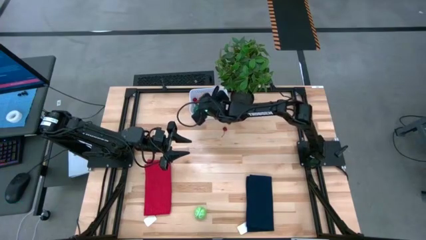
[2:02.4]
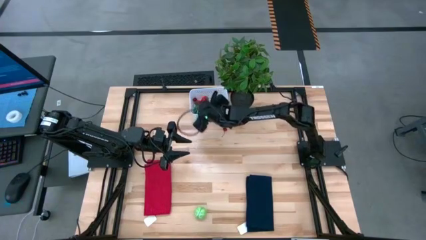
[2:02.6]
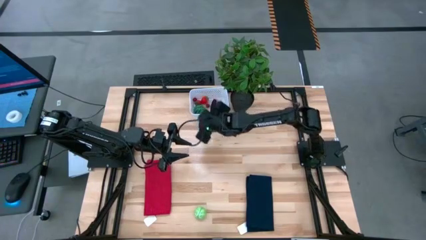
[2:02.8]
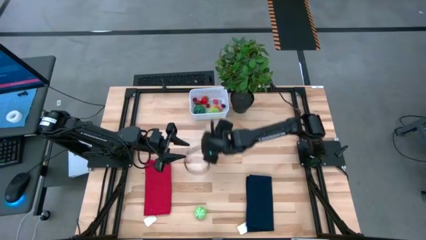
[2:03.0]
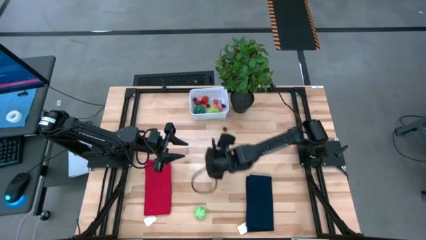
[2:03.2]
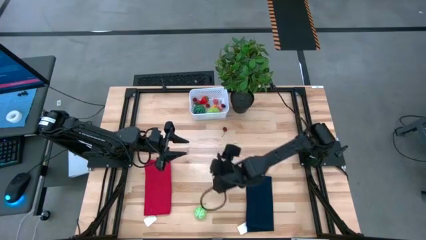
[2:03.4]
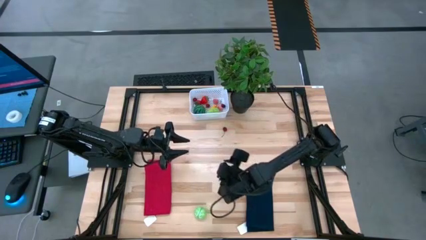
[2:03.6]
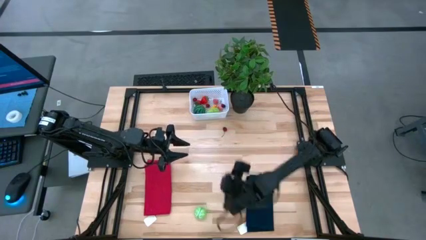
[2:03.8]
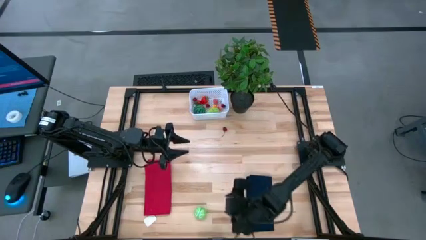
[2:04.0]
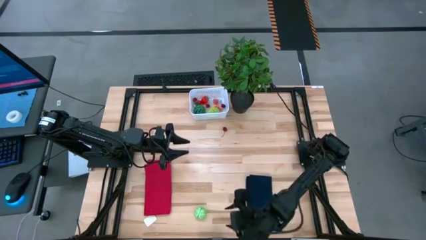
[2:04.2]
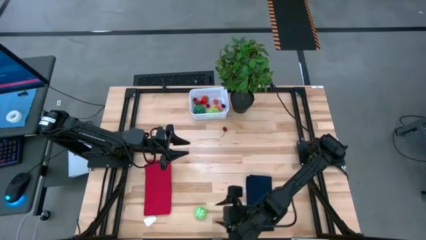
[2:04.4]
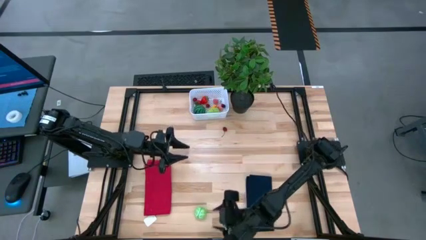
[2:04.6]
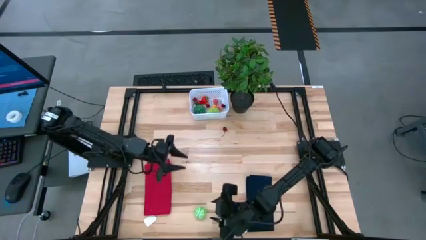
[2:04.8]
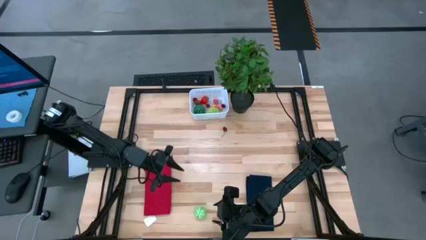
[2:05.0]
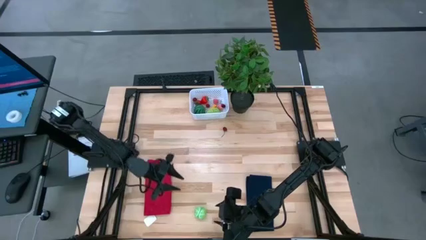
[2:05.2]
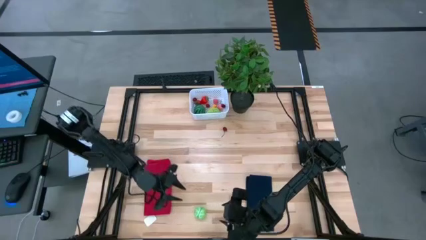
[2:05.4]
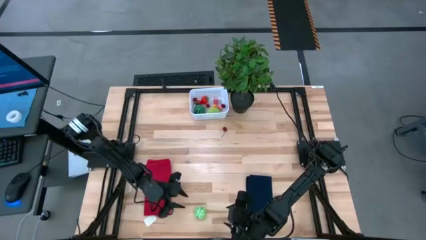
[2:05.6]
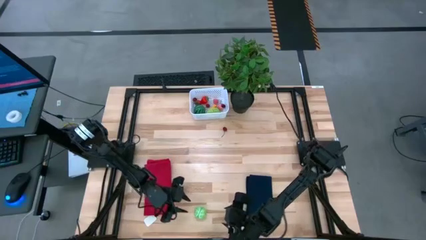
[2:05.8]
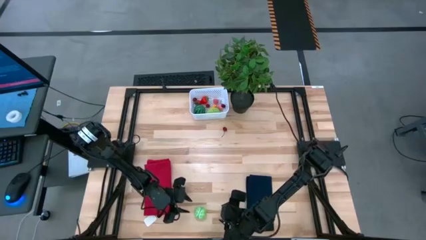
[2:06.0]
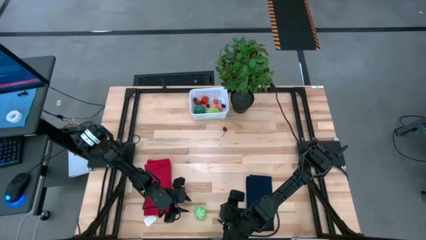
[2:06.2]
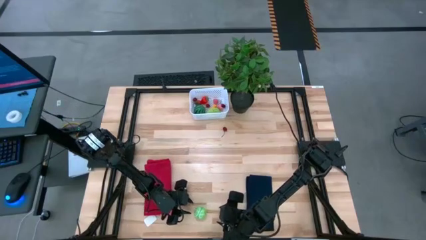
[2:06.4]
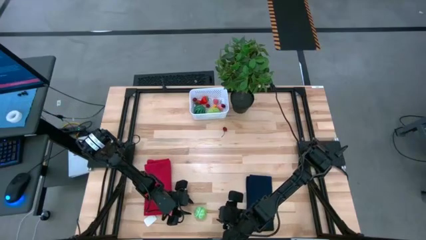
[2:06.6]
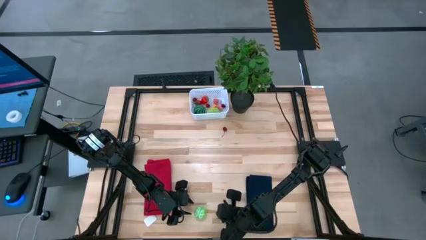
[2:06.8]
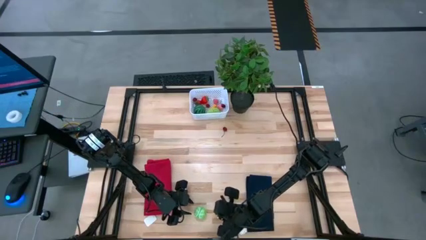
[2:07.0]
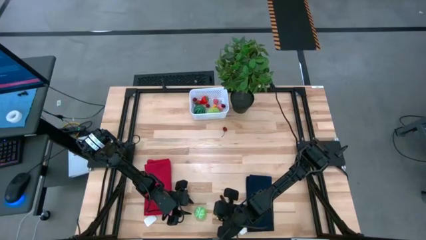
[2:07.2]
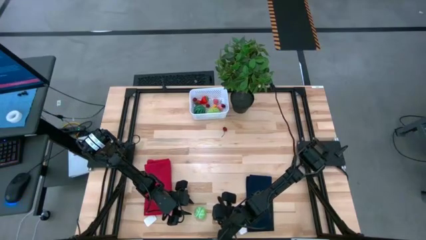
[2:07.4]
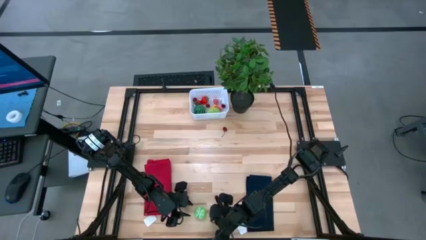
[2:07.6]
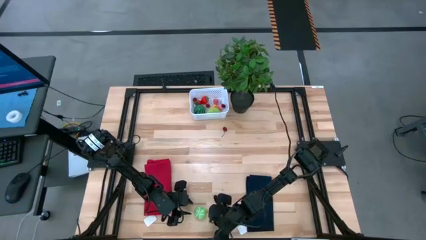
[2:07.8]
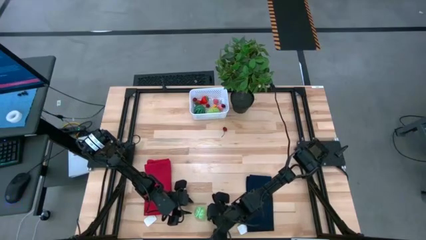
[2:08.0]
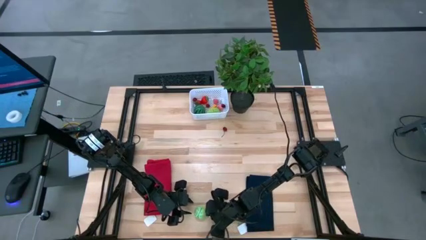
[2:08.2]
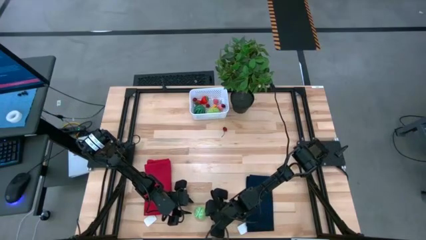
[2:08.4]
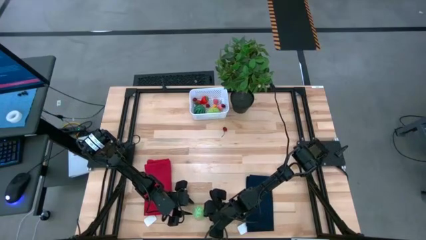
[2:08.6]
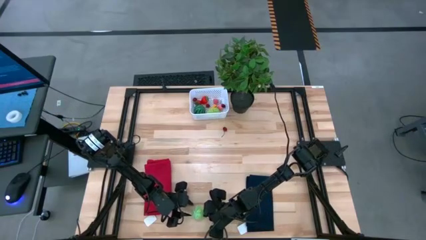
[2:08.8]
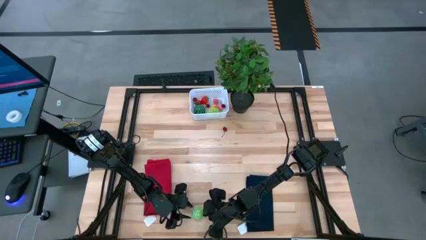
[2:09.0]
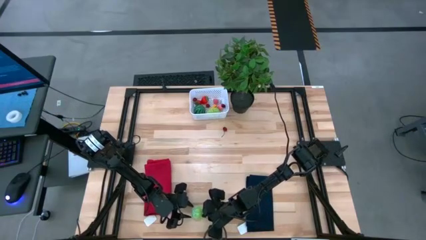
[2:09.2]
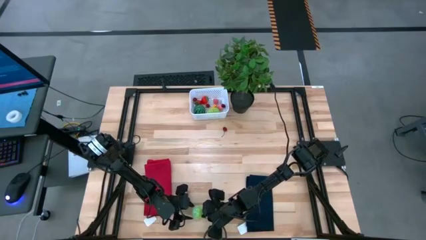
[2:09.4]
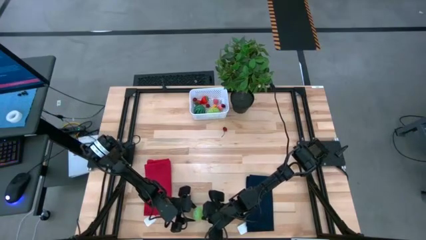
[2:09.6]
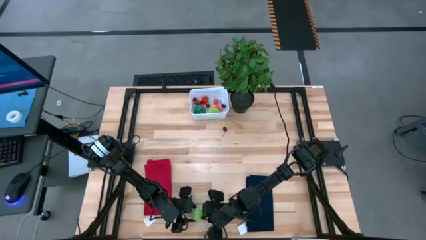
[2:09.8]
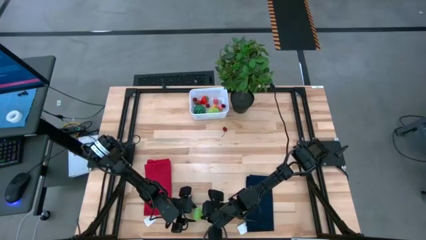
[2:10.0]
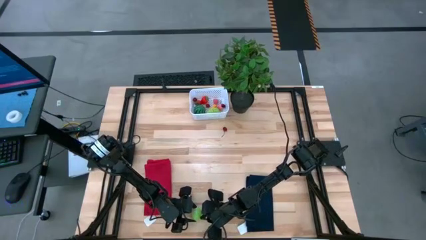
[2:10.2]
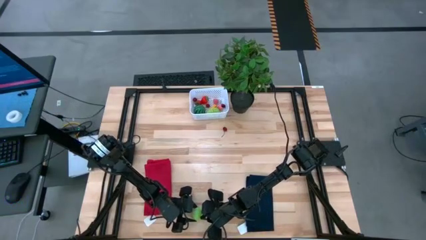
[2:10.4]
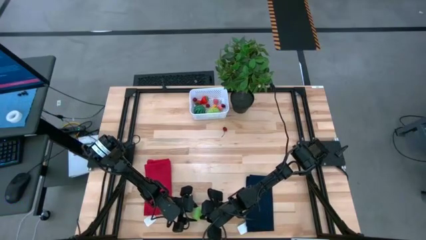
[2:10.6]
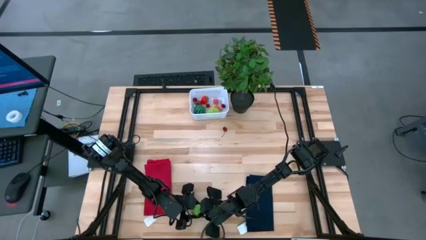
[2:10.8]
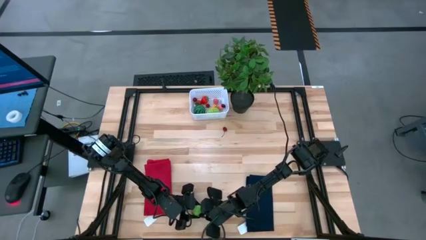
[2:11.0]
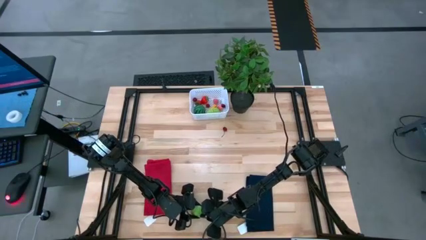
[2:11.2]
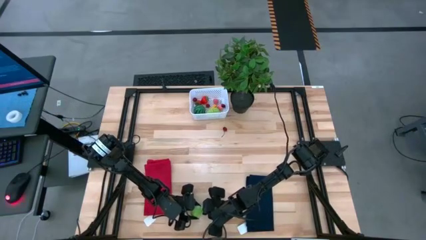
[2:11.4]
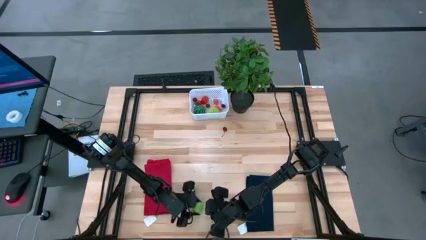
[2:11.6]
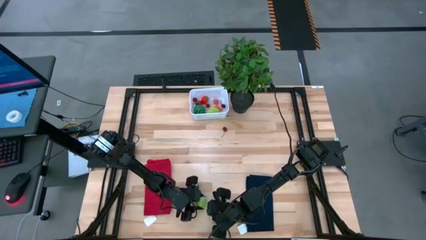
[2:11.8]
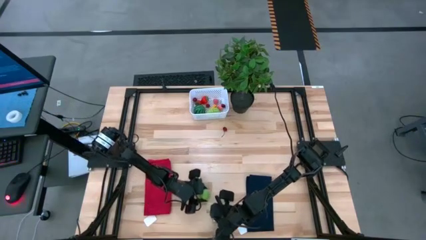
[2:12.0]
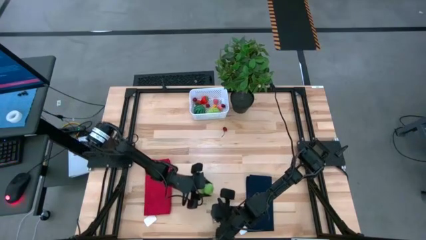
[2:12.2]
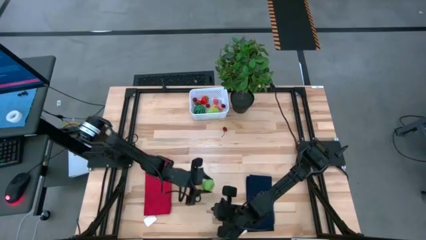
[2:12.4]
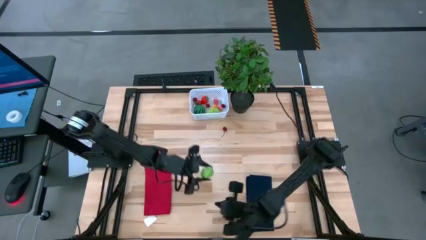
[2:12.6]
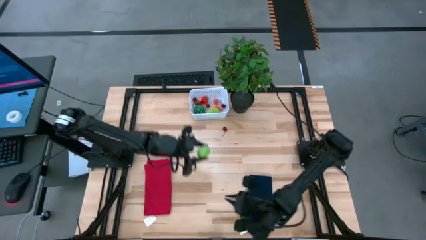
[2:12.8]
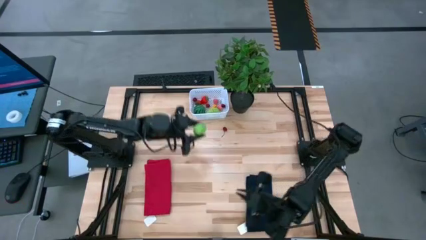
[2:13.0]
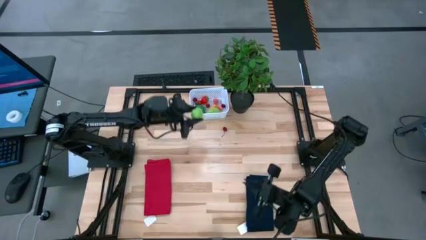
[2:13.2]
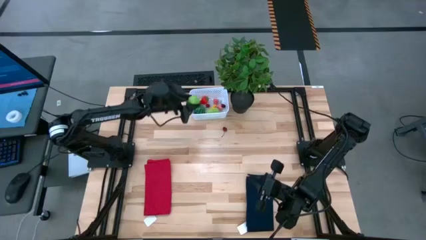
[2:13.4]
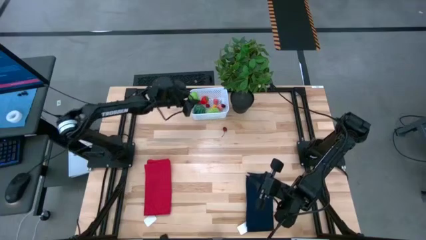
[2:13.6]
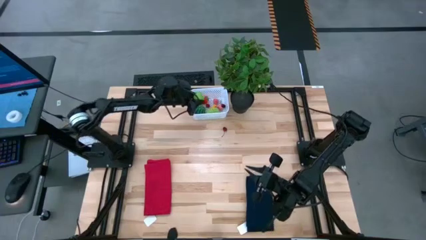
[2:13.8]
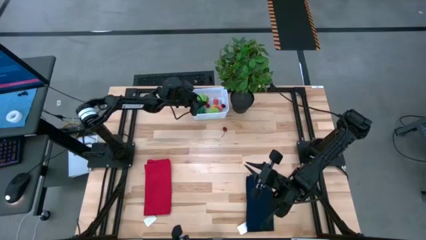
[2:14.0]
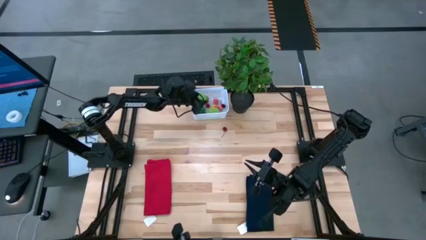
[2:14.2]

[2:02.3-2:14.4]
Task: Pick and placing Produce into tupperware
Put the green cabbage into the white basket

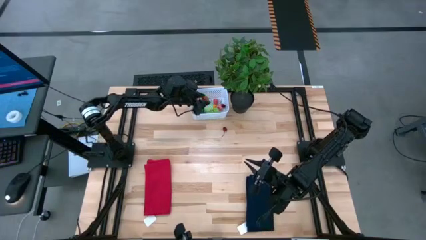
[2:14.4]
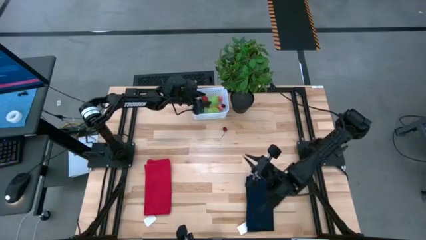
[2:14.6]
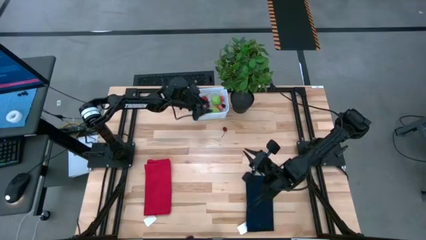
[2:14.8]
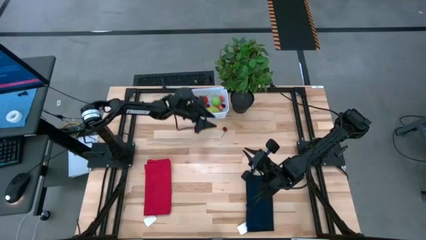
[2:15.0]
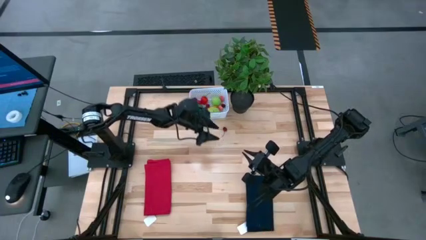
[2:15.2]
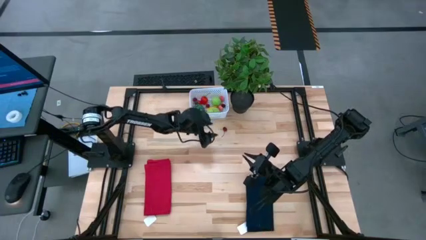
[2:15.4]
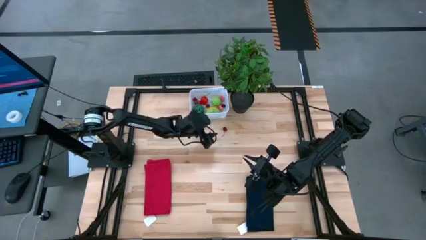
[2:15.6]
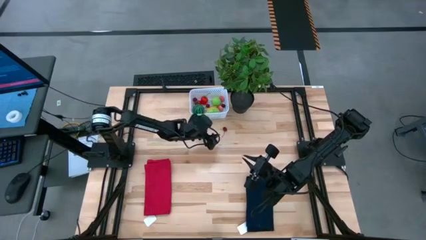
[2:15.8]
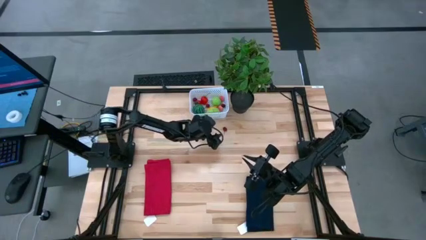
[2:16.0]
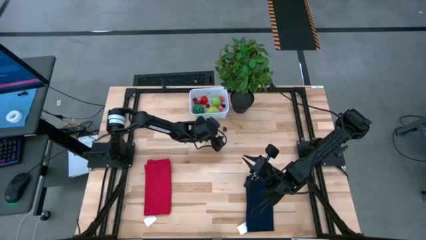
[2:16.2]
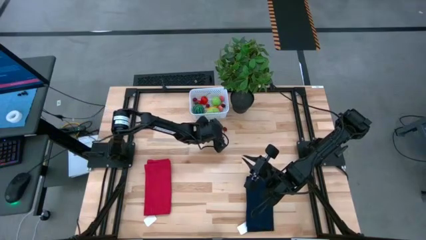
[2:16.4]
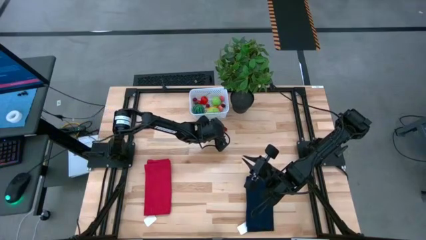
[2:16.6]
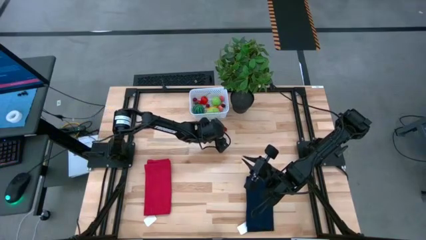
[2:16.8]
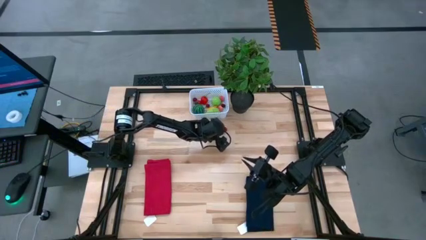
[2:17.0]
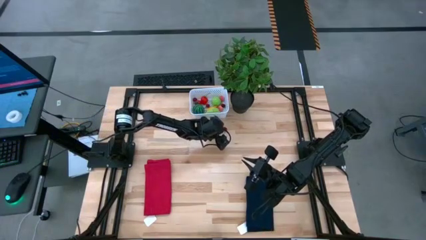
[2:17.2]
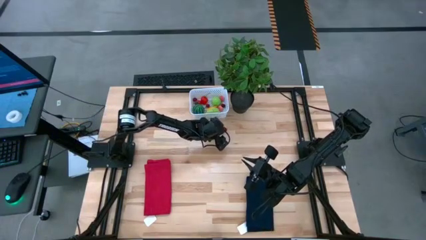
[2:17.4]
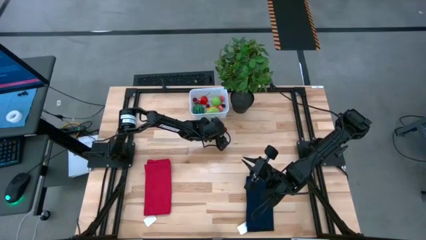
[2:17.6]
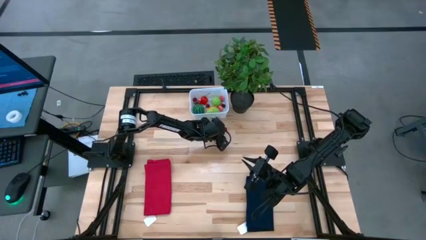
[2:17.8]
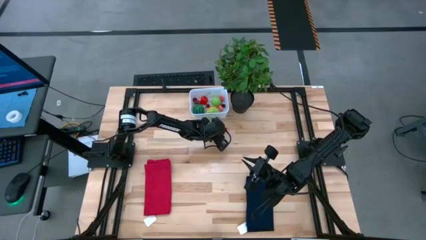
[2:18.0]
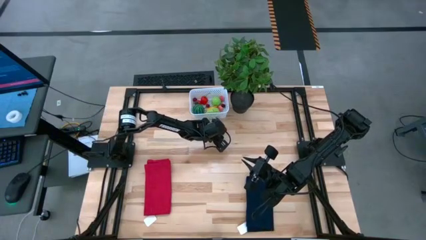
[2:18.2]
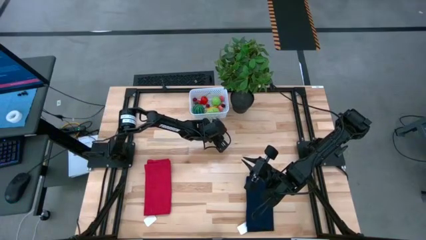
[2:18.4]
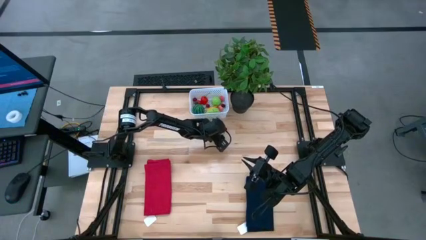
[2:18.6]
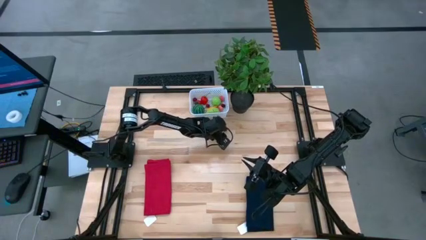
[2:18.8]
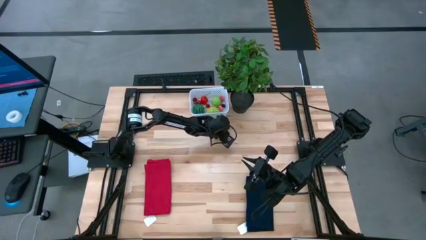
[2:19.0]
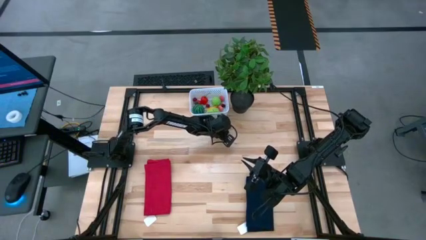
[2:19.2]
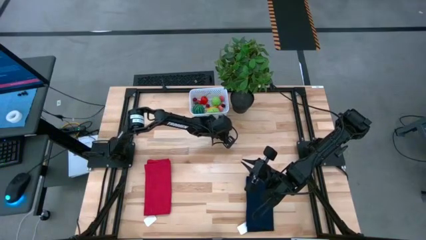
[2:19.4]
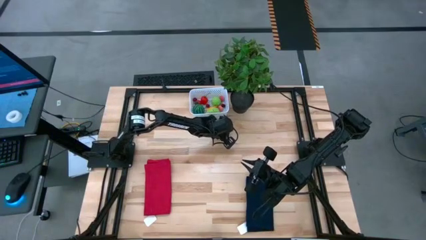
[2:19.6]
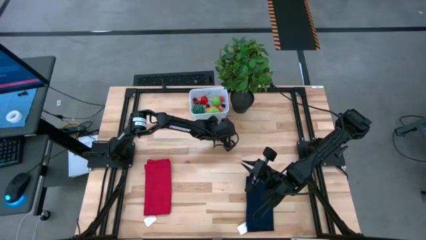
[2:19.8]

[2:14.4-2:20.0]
Put the red cherry into the white basket
